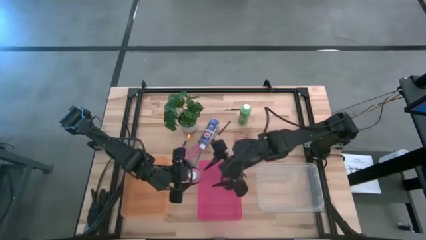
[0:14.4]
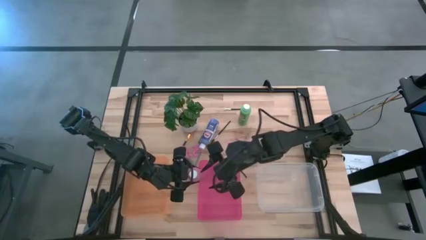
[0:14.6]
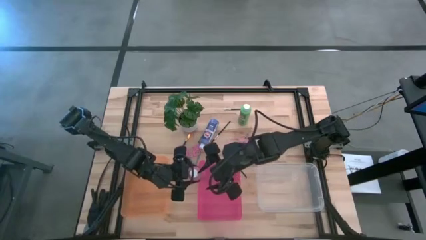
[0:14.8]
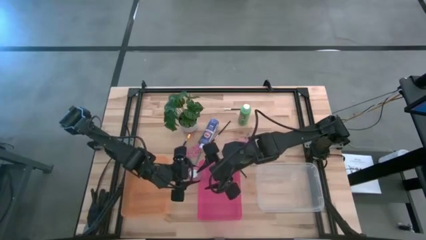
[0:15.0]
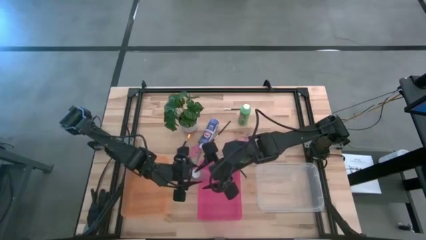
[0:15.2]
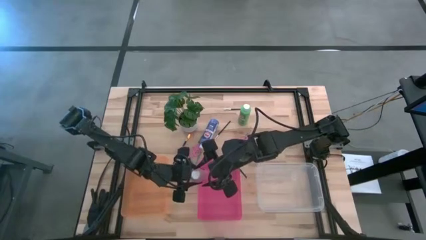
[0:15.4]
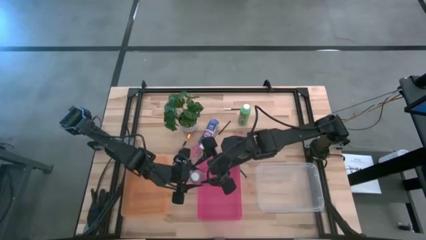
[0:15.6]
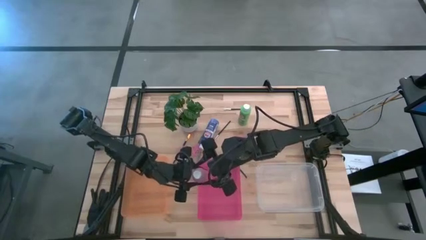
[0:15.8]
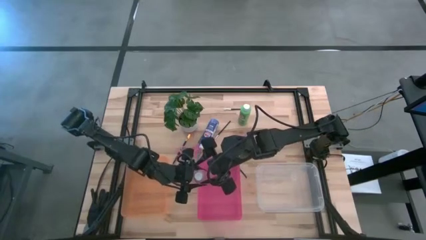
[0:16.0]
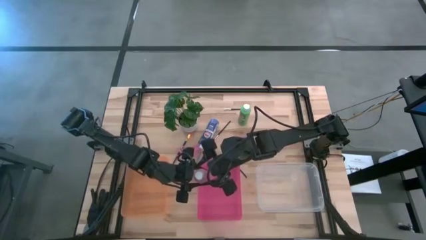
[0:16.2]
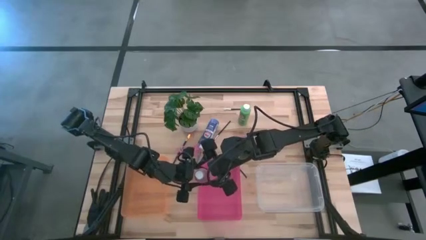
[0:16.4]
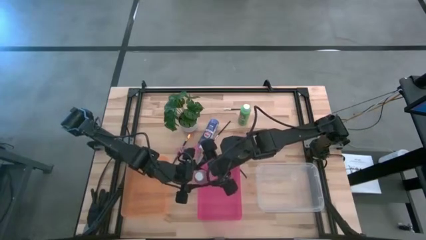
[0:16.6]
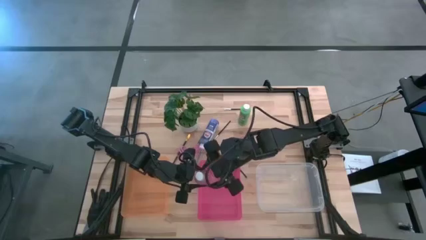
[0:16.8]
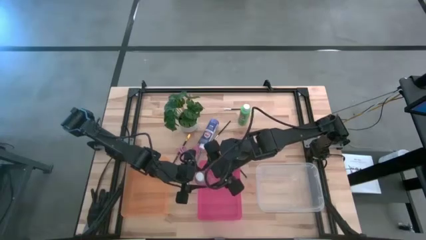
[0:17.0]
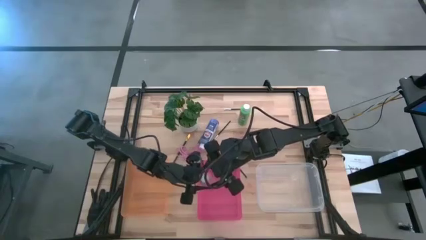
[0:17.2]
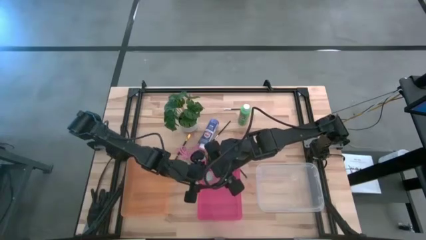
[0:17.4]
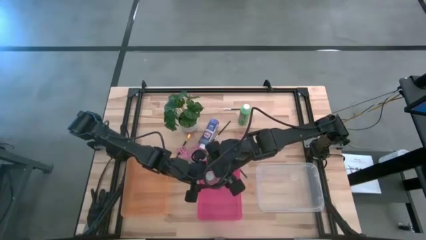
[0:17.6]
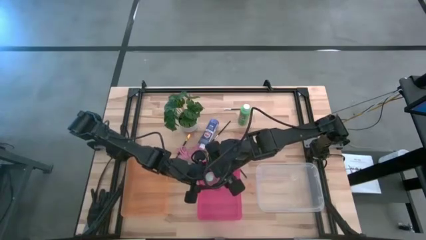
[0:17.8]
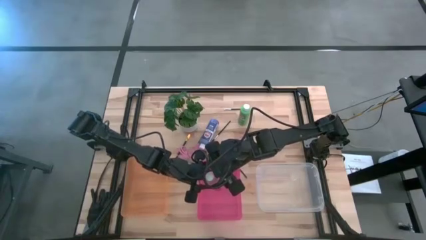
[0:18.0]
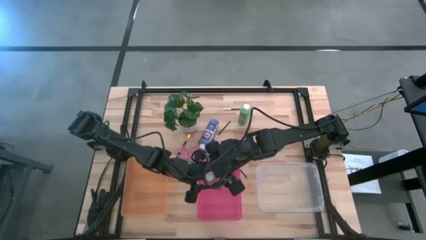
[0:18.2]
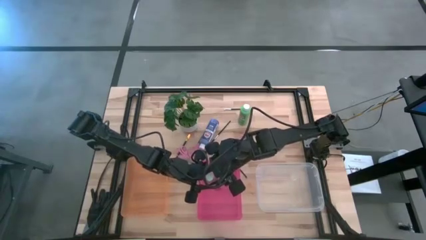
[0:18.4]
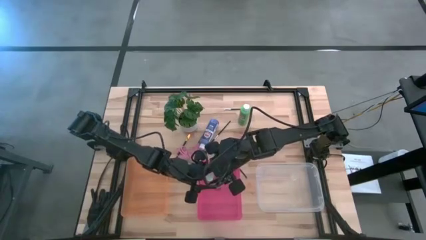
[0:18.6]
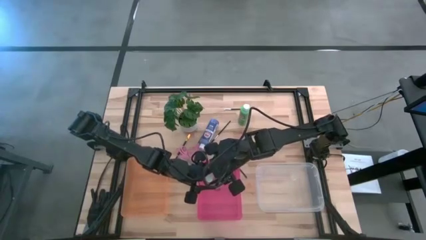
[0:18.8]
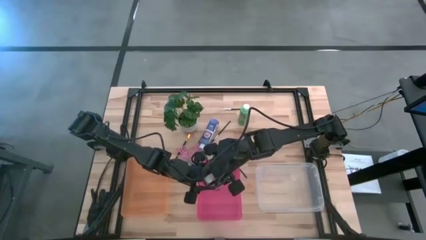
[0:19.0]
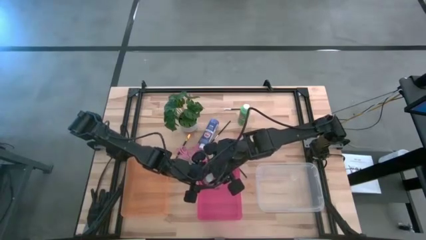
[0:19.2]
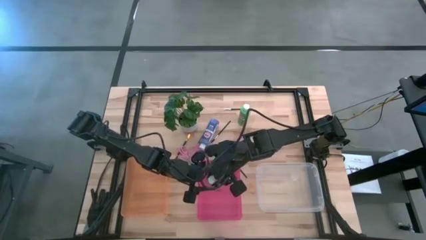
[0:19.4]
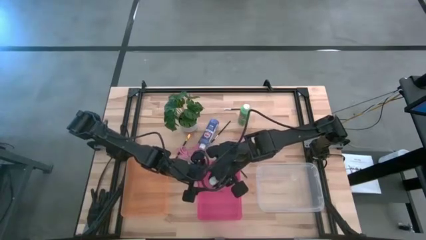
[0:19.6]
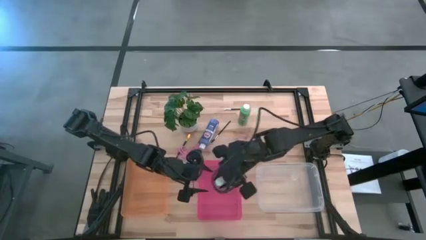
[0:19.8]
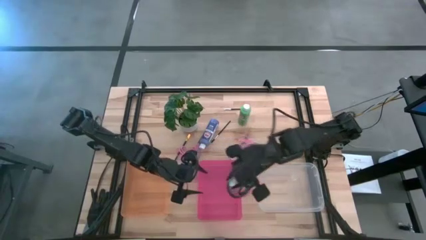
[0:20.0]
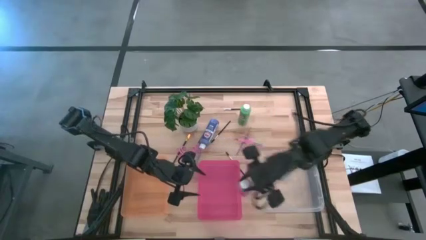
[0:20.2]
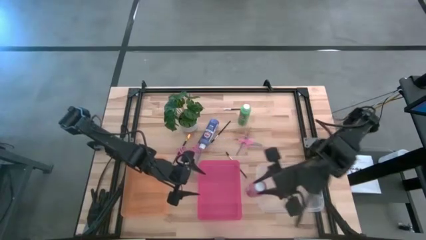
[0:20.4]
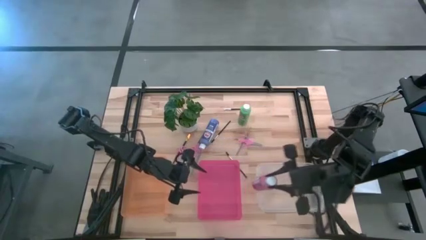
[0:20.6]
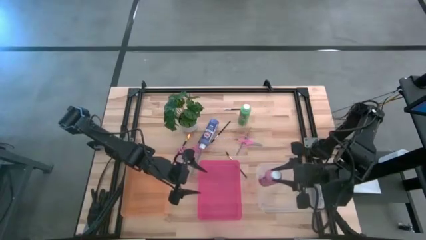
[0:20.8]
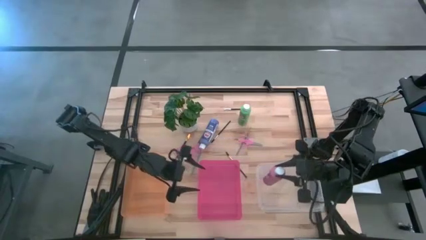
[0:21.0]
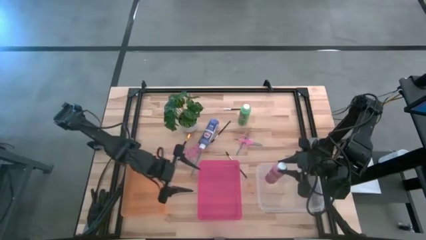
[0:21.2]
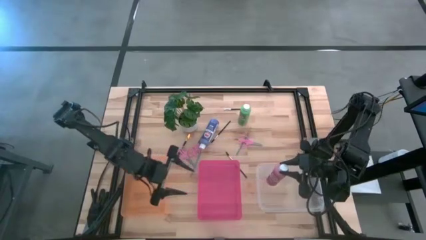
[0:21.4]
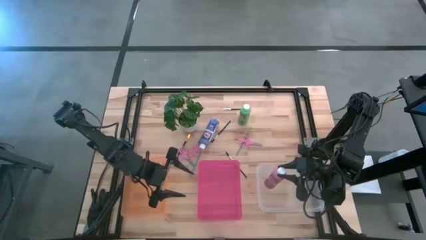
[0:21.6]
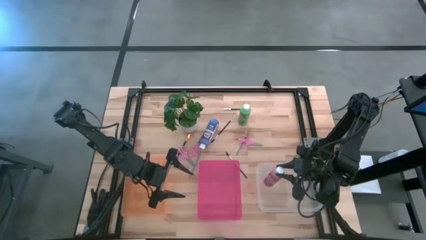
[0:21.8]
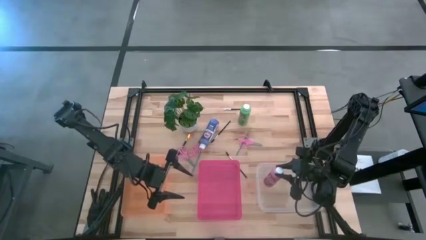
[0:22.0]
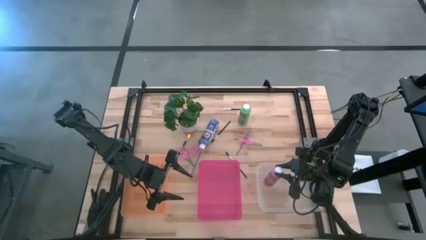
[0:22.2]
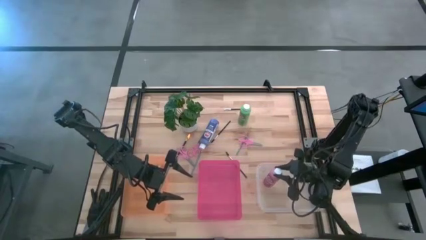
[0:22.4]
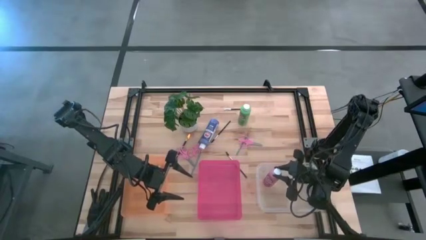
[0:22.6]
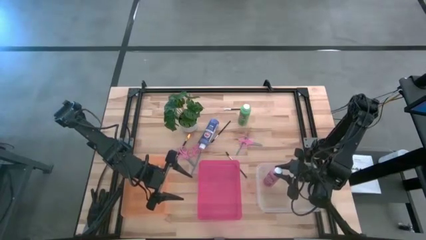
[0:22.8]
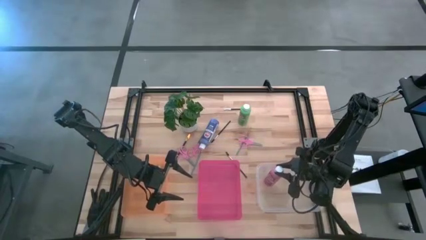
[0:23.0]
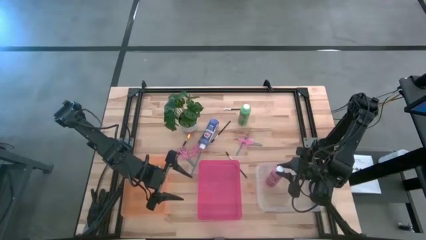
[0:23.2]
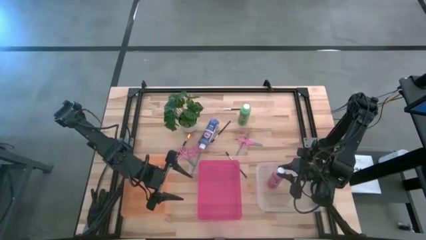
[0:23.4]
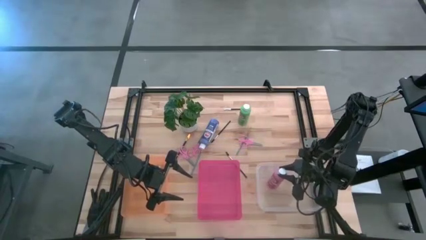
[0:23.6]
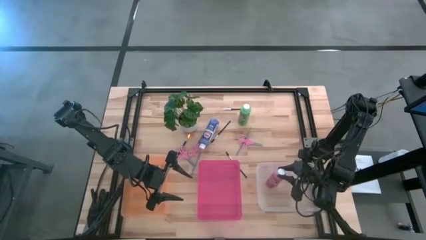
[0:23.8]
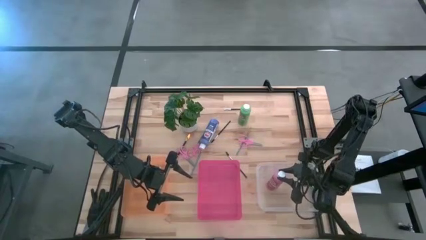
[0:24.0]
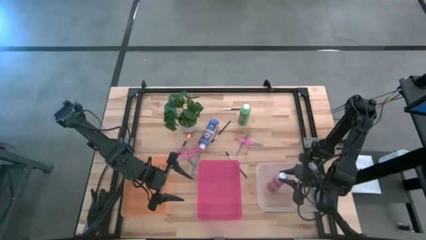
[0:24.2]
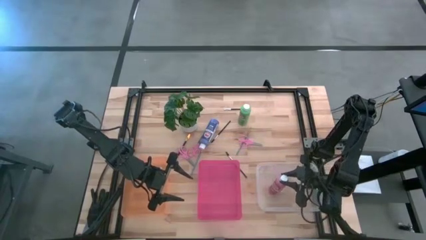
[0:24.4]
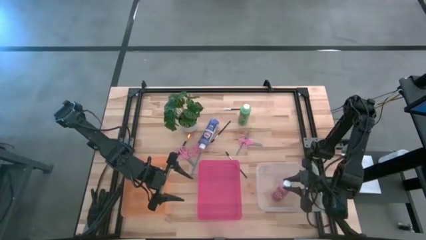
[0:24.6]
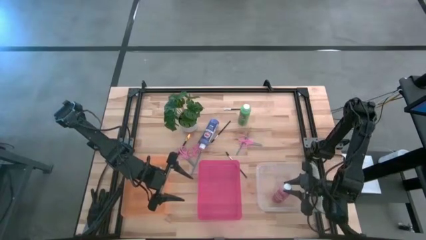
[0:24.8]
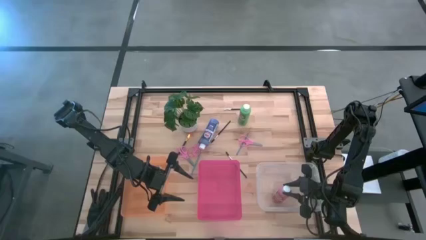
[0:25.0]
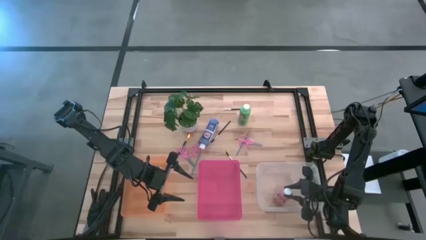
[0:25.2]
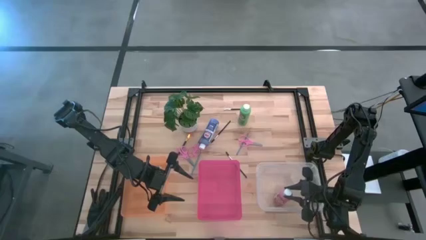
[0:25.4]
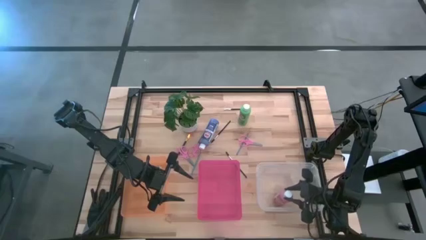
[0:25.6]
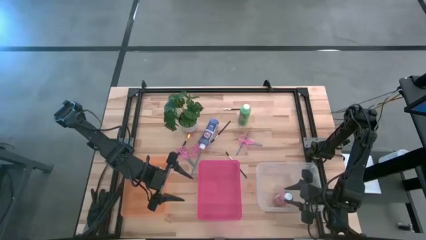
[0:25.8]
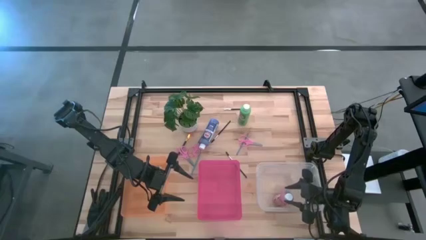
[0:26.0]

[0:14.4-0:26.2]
Task: Pick & Place Paint Supplies
Put the pink paint bottle into the transparent bin

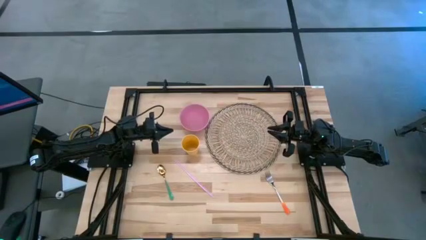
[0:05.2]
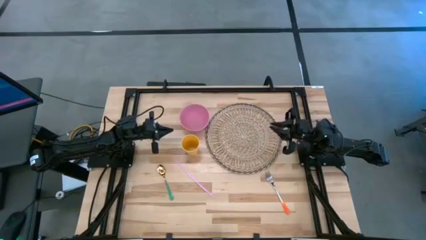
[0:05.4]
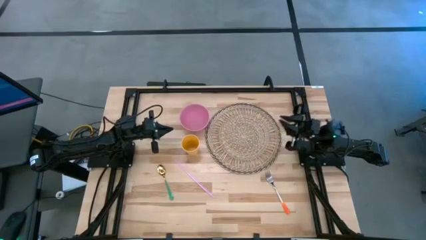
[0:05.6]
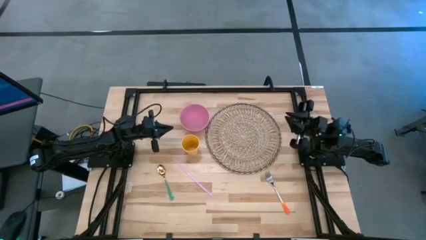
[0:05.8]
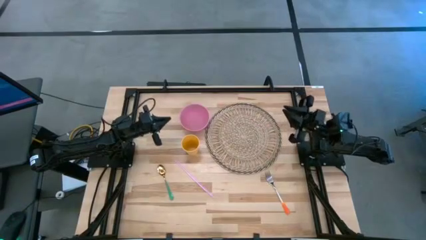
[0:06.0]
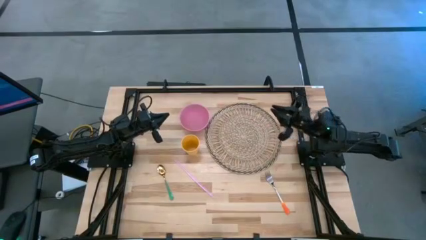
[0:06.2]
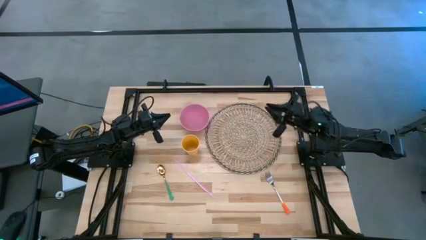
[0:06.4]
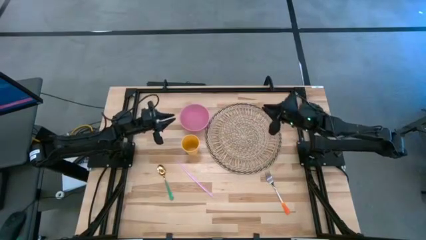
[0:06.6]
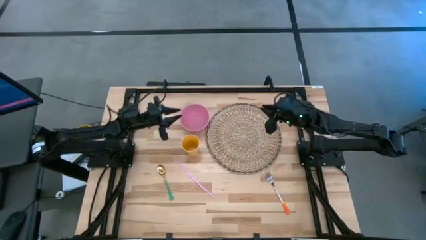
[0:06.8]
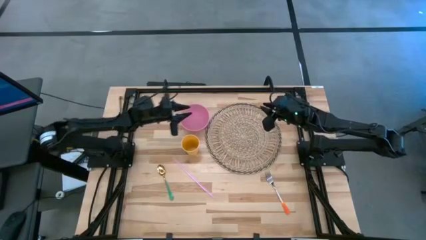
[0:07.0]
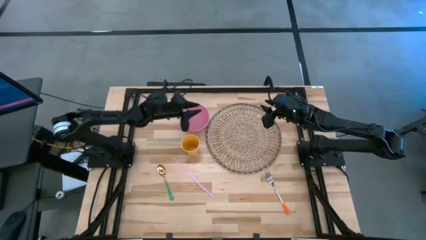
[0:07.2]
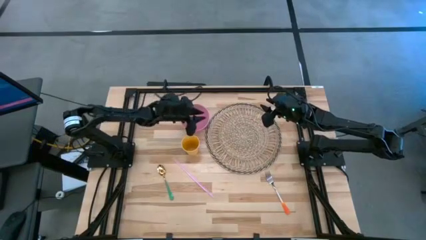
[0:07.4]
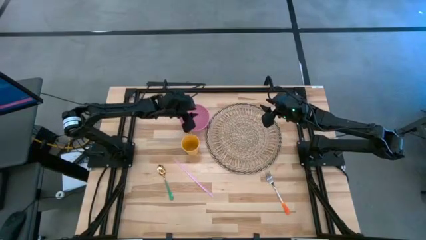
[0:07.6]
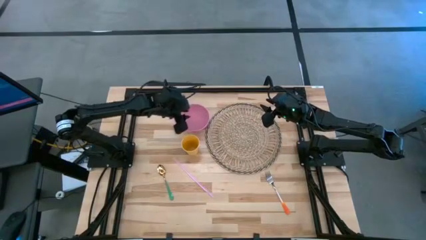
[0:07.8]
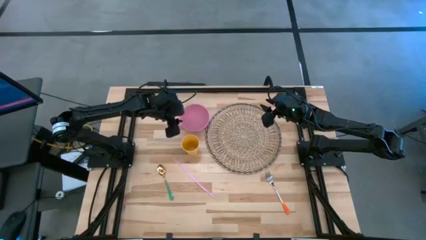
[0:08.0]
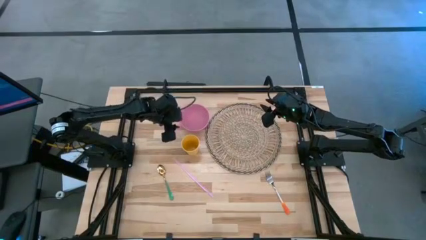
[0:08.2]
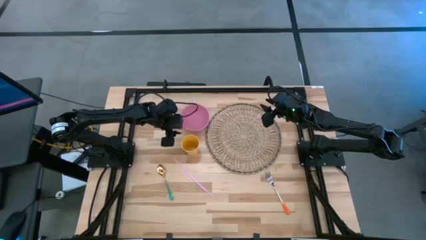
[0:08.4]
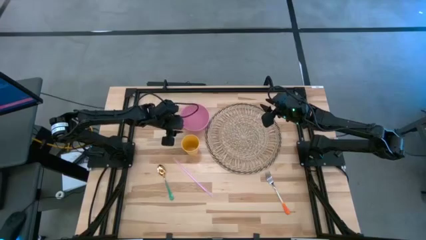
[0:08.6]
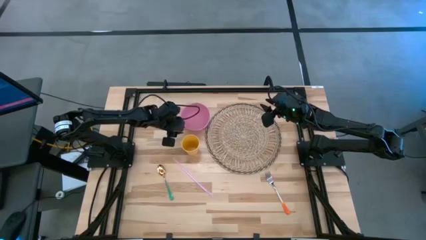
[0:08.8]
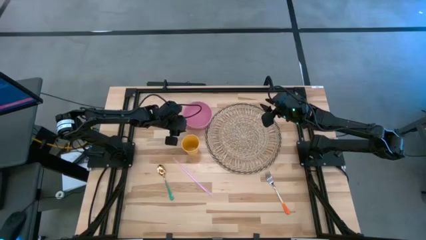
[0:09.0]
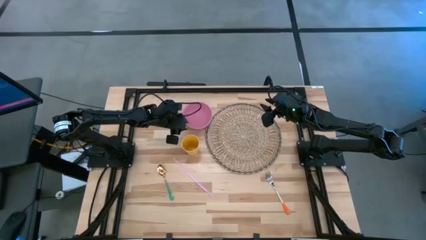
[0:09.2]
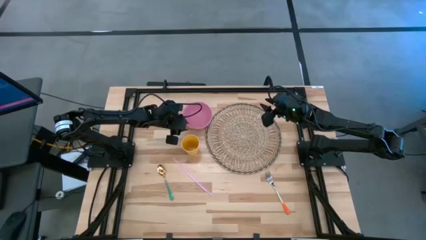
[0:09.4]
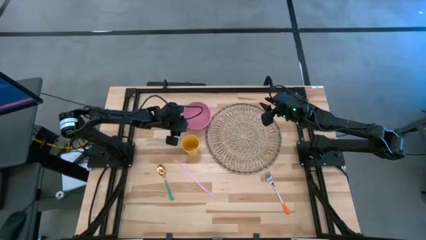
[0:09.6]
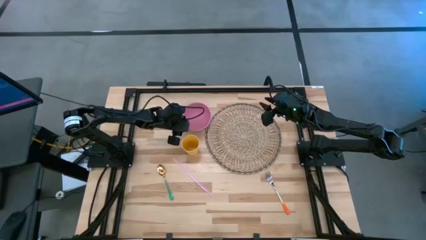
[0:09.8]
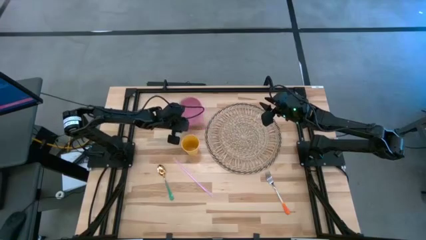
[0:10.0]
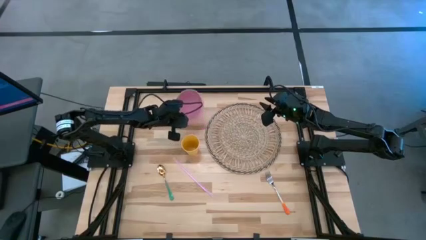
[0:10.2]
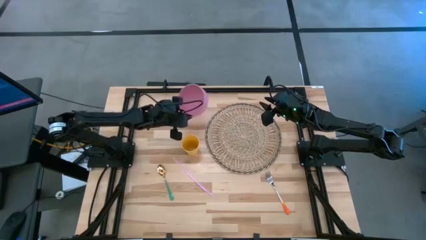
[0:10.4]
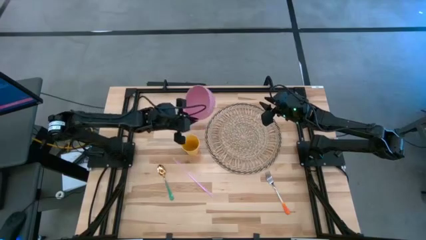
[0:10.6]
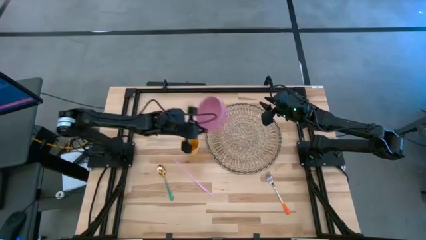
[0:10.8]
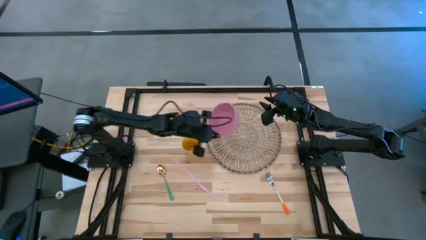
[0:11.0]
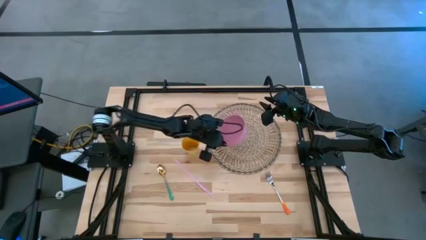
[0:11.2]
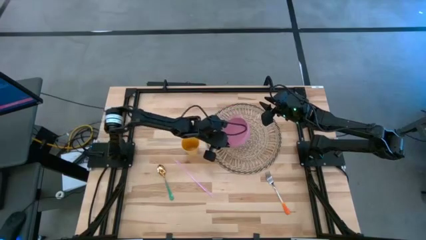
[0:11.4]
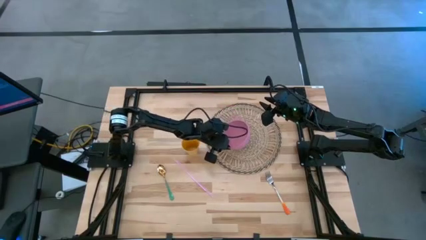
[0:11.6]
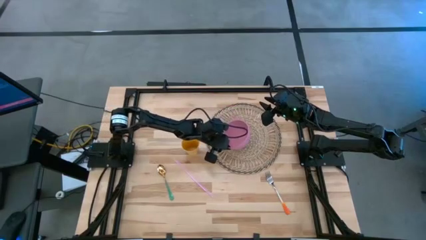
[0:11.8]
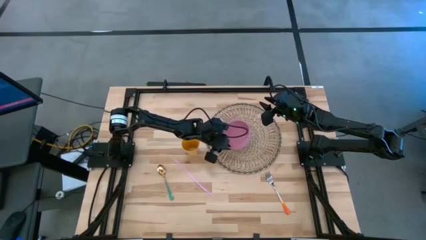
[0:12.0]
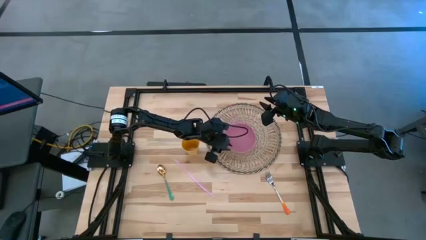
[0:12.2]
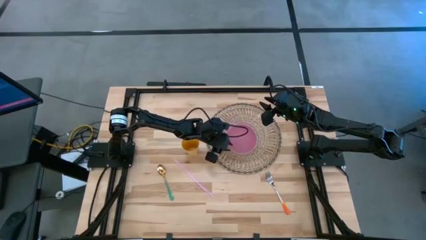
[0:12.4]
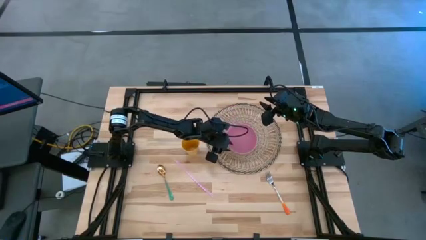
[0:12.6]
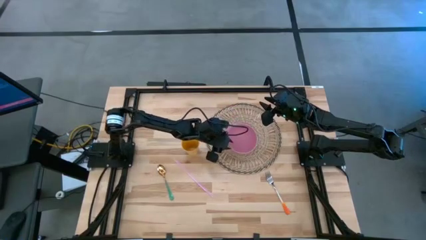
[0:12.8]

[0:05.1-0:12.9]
Task: Pick & Place Utensil
Put the pink bowl on the brown mat
